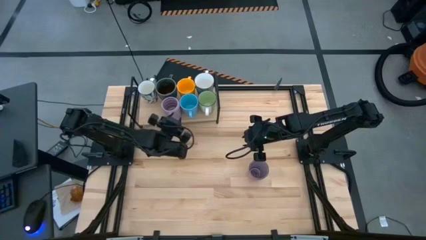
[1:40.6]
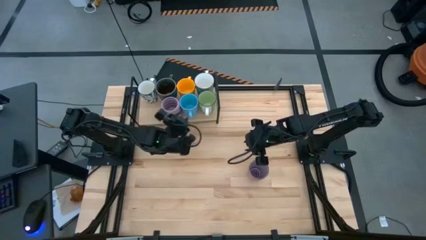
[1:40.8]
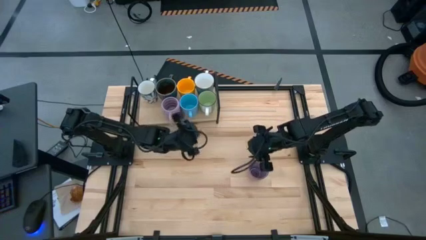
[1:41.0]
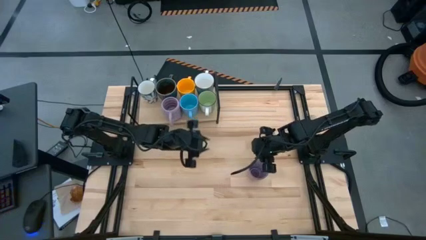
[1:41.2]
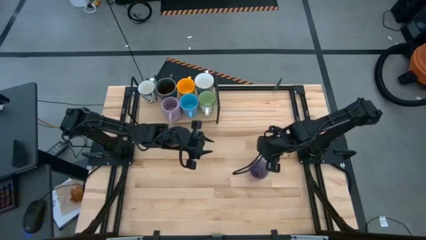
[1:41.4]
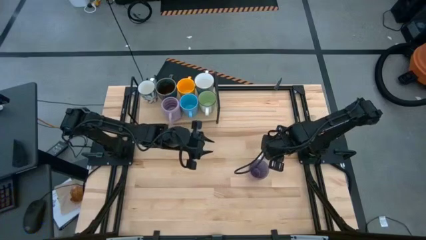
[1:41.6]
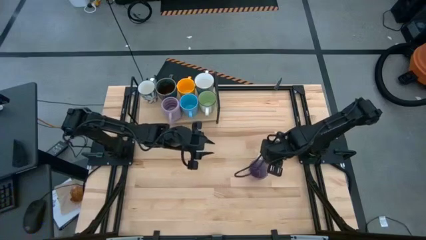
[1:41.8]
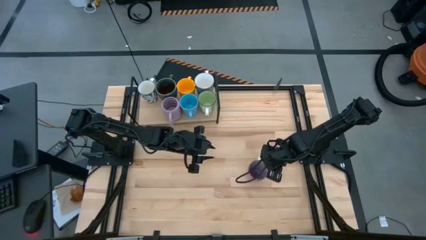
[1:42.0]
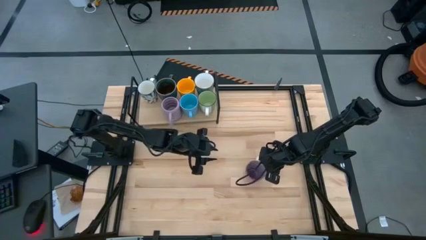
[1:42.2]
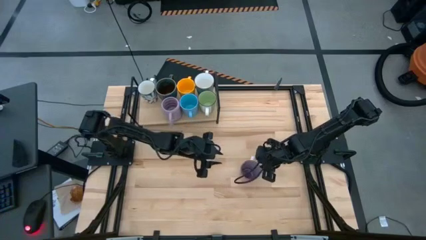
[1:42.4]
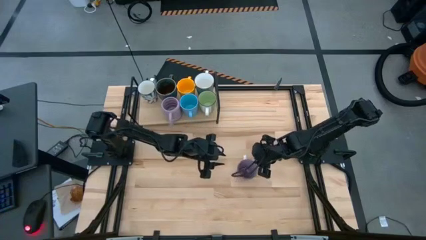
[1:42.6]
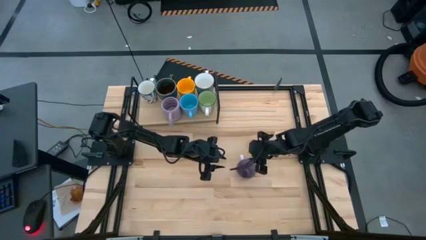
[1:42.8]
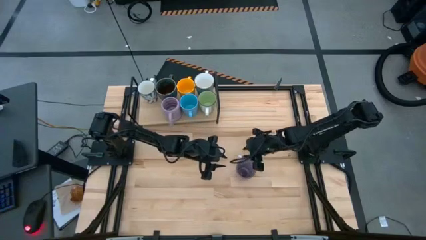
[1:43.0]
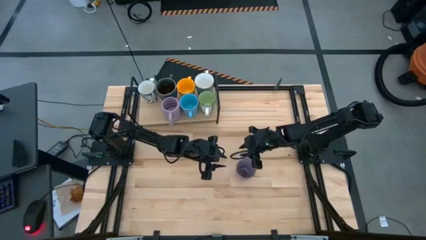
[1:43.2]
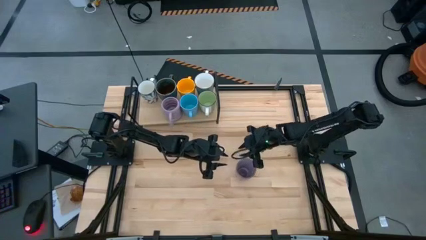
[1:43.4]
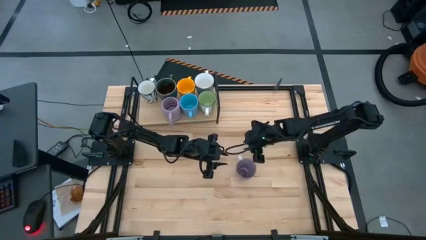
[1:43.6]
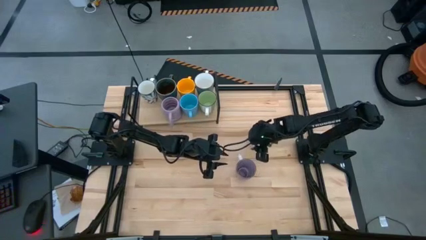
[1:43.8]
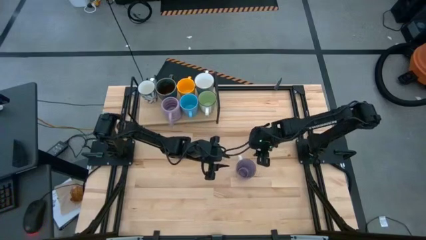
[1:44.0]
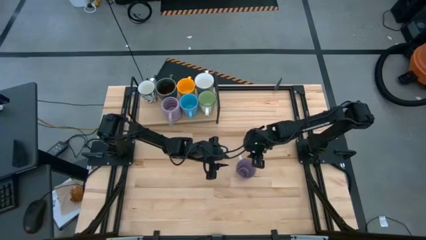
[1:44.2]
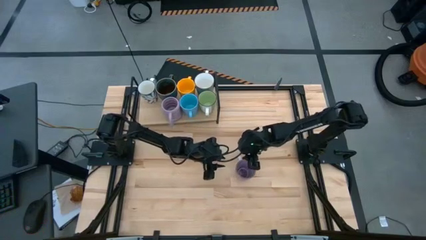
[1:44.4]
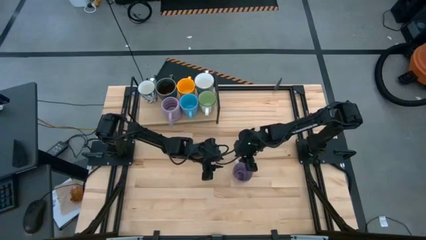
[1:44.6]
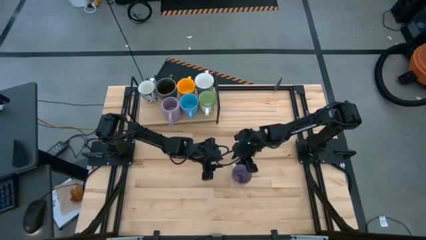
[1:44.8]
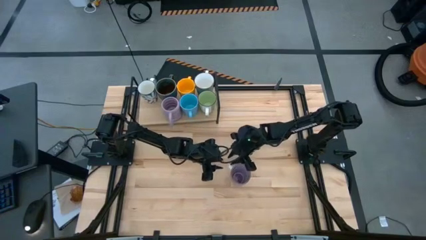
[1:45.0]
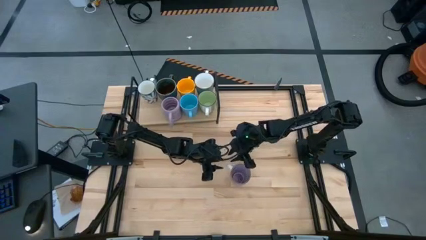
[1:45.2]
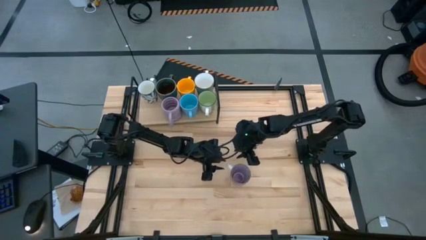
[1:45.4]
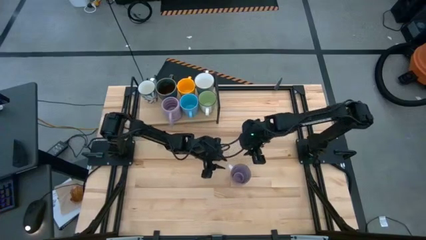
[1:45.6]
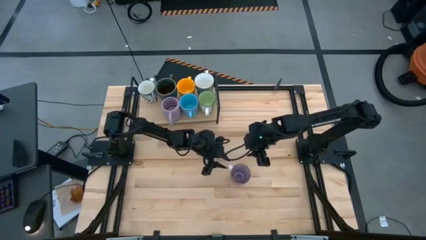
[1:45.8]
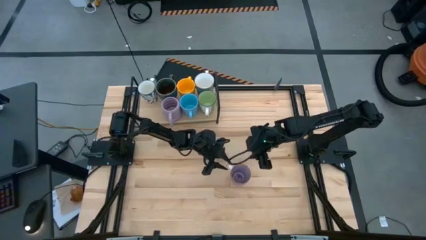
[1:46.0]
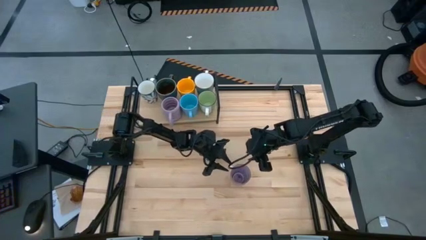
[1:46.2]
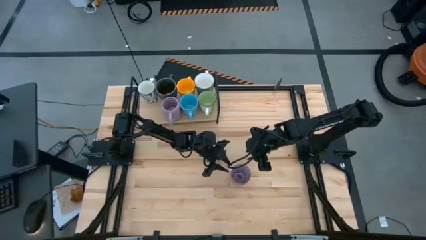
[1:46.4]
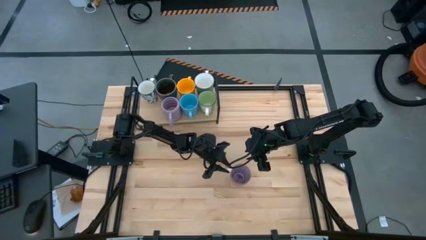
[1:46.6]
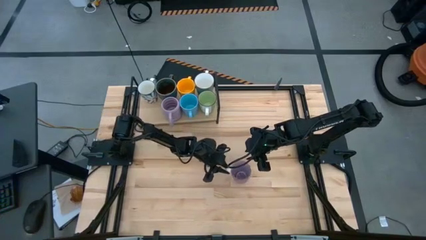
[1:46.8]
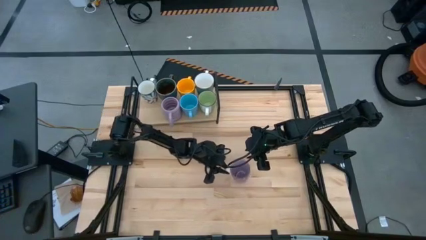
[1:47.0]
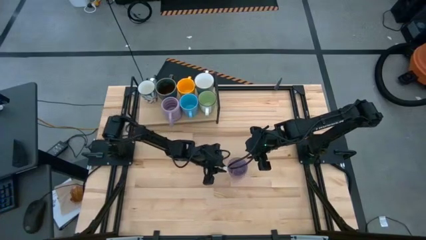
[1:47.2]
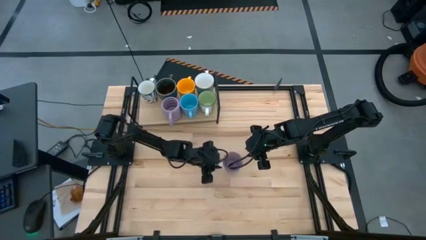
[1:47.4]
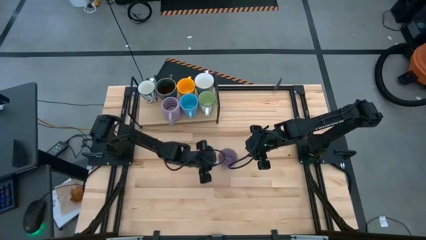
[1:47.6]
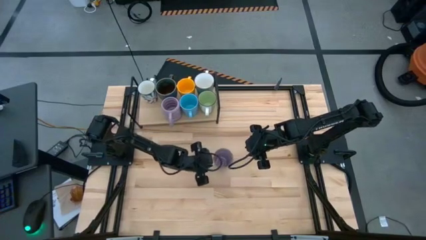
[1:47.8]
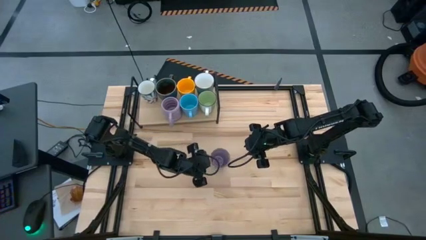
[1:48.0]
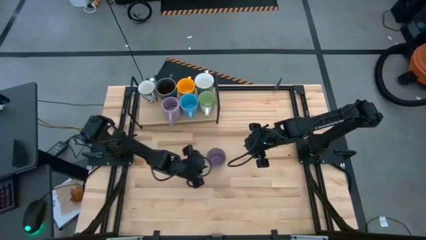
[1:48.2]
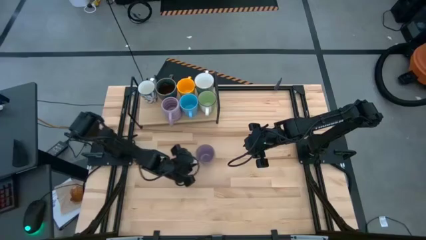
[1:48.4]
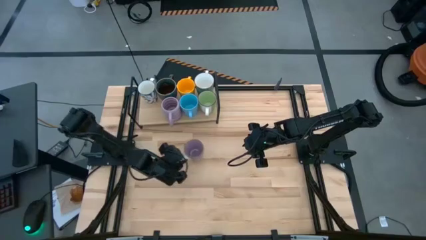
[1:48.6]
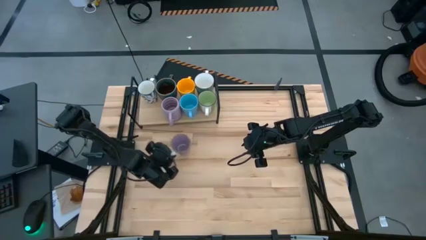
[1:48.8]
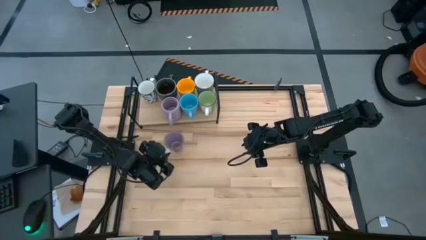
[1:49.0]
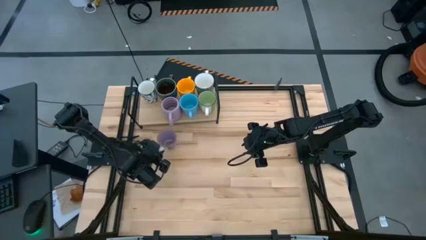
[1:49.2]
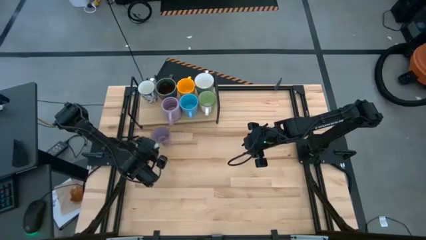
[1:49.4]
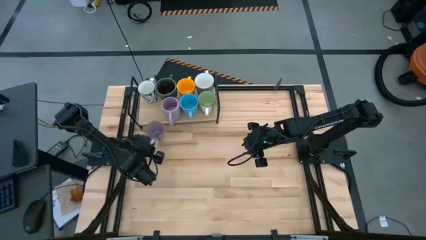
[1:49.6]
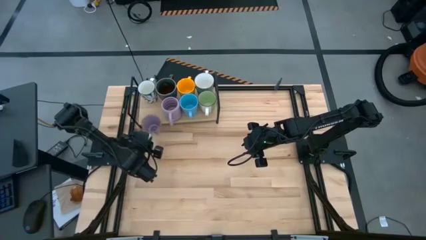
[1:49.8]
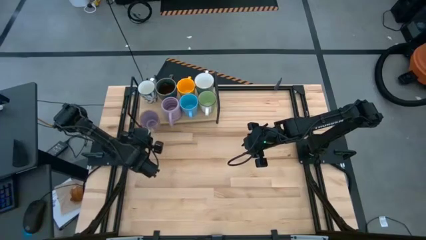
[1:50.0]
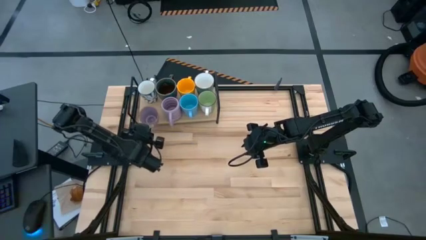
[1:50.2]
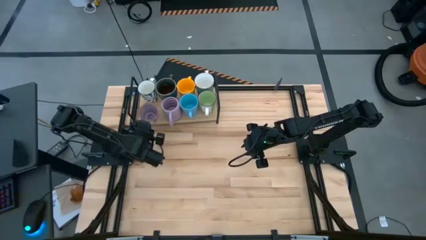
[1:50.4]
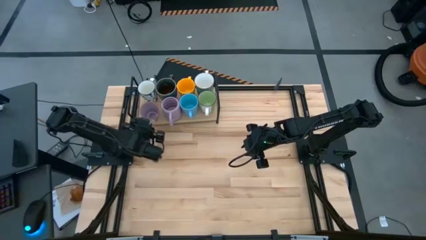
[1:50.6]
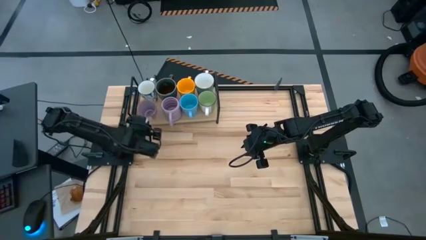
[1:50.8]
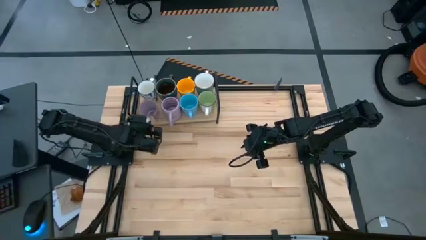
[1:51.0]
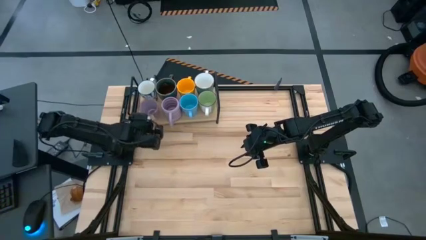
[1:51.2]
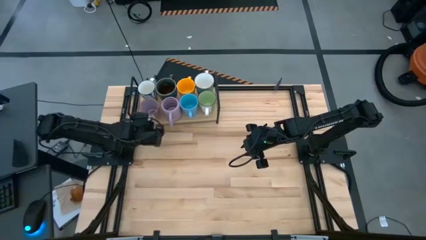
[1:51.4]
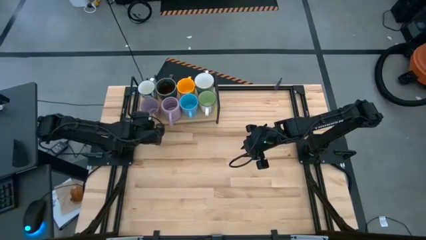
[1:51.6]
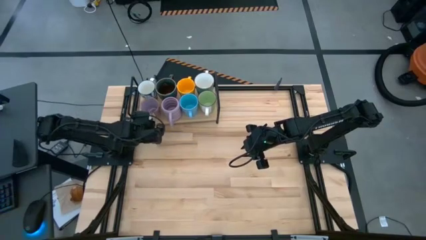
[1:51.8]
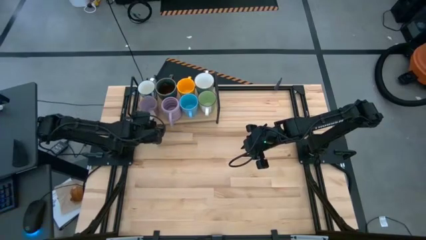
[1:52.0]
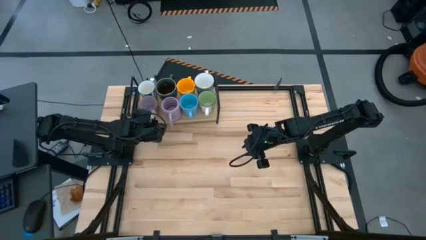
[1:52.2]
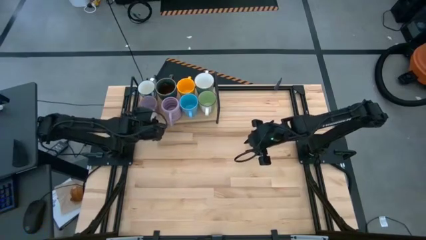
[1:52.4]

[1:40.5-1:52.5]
Task: Place coffee mugs
Put the purple patterned mug on the shelf

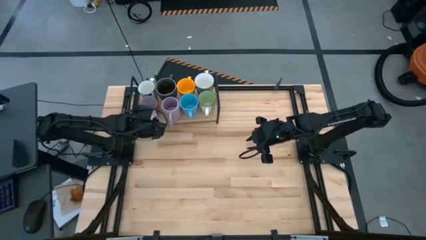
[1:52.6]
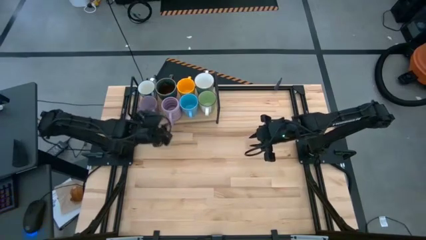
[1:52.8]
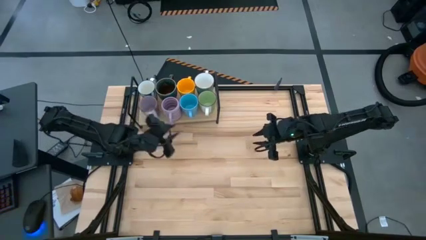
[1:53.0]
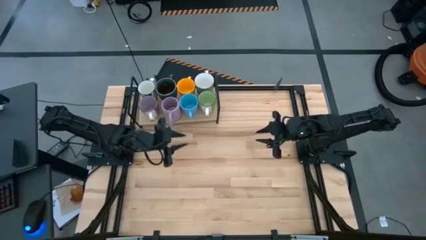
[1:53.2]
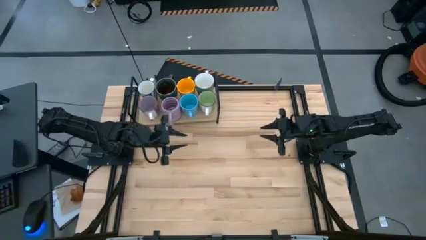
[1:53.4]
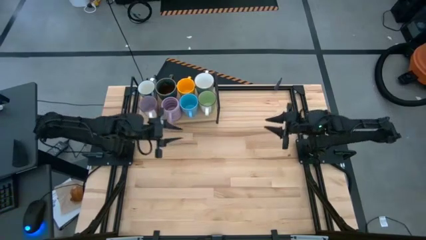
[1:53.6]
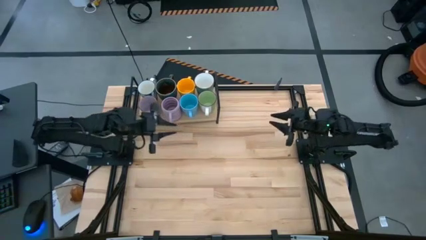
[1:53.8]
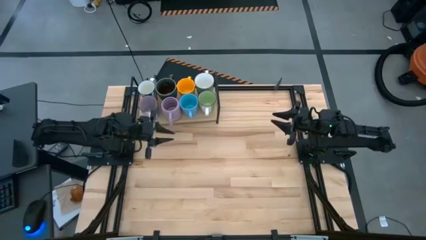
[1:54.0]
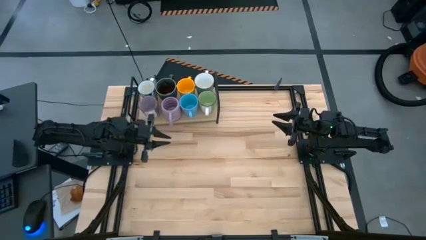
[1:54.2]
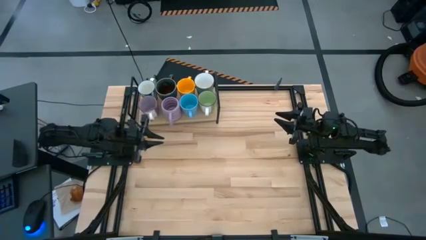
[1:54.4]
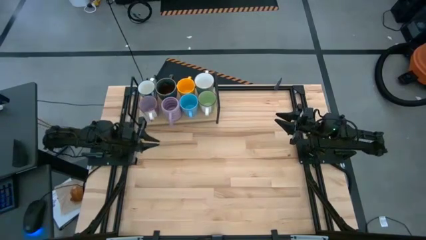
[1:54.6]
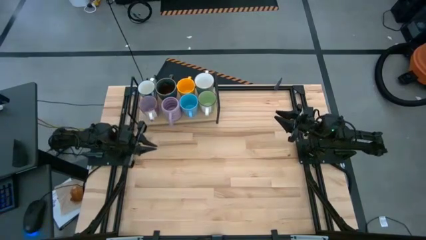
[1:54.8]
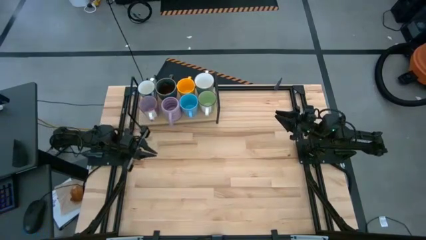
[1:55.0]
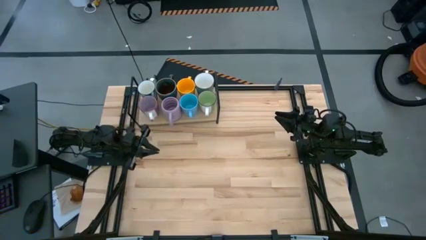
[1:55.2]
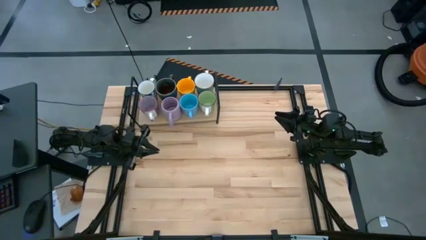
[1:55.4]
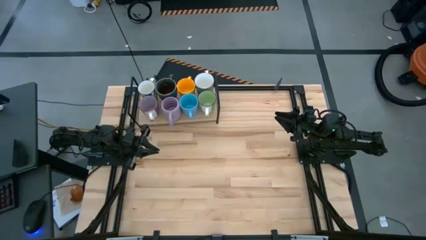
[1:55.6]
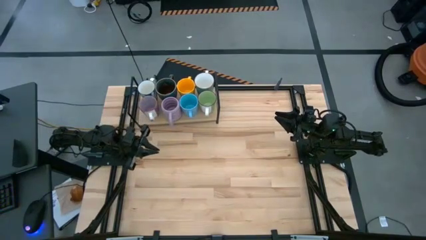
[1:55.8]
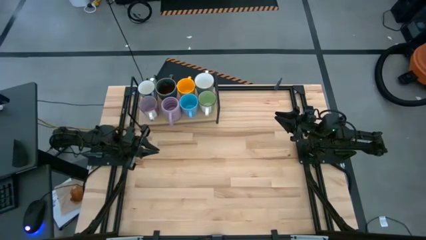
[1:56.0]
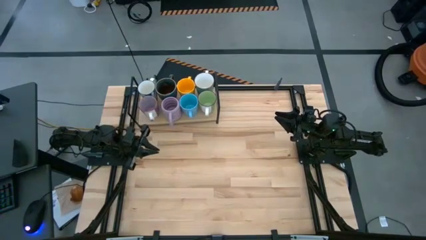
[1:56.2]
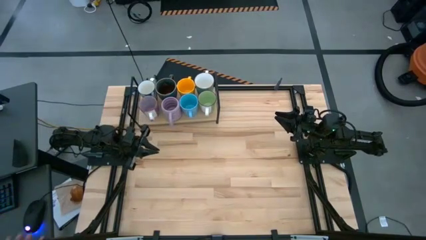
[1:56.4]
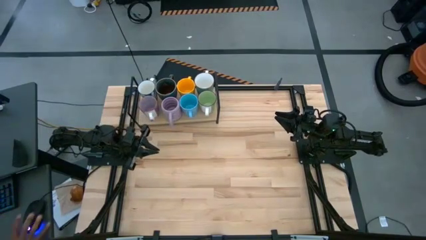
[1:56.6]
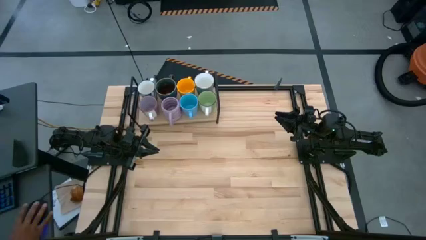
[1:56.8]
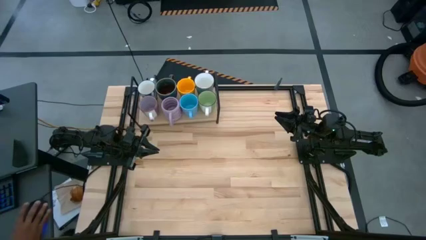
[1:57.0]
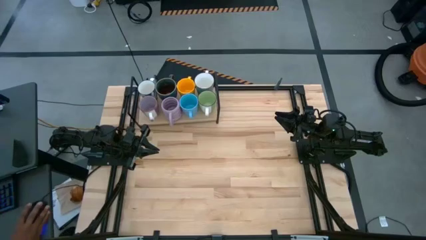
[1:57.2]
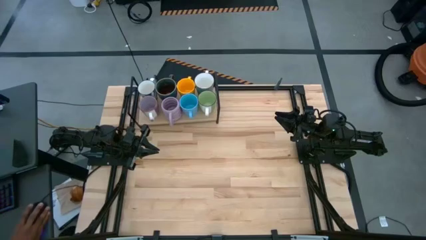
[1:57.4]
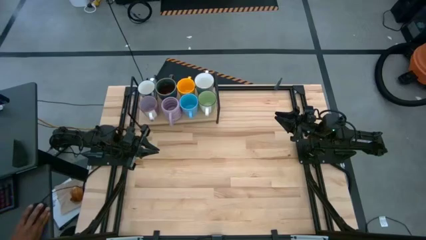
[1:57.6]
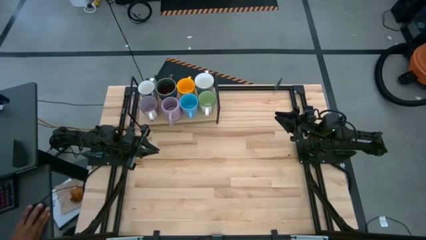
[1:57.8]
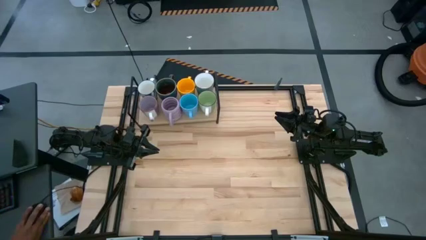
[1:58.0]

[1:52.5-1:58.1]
Return to Home Position
